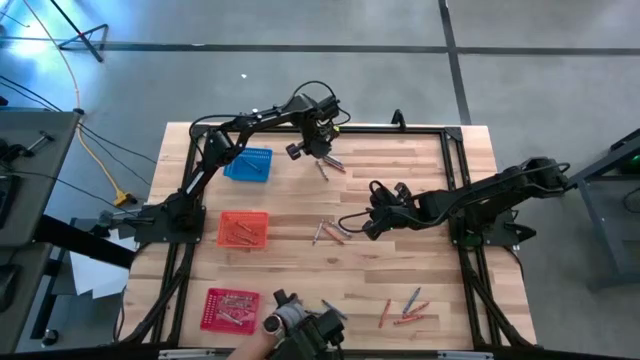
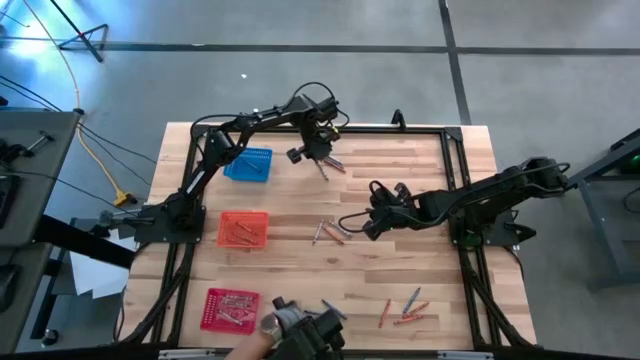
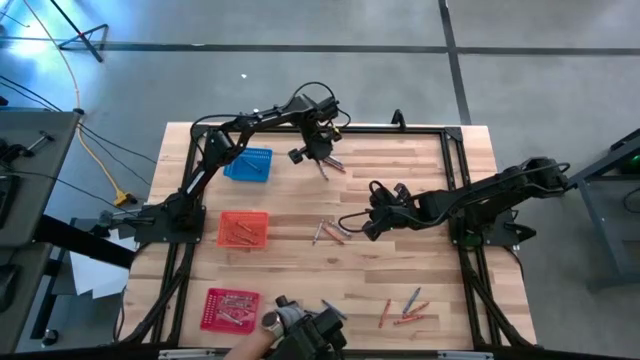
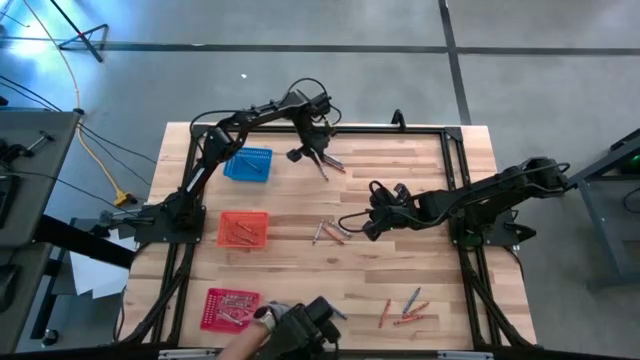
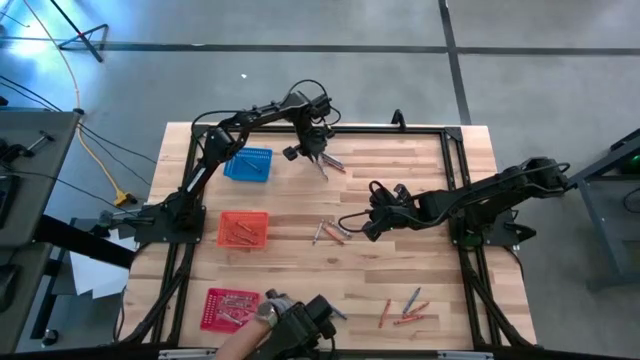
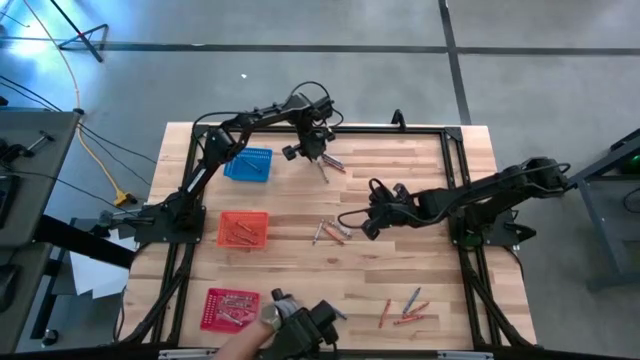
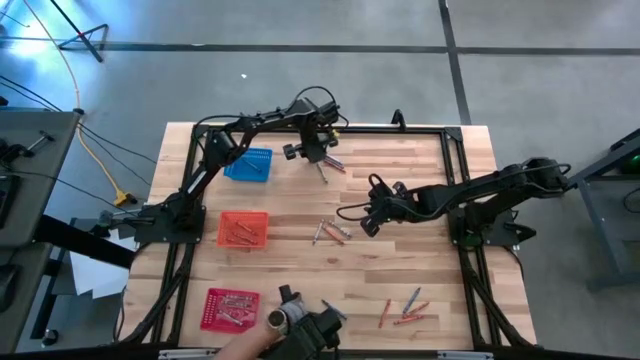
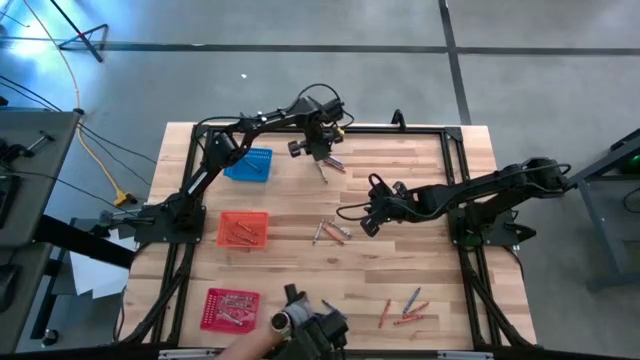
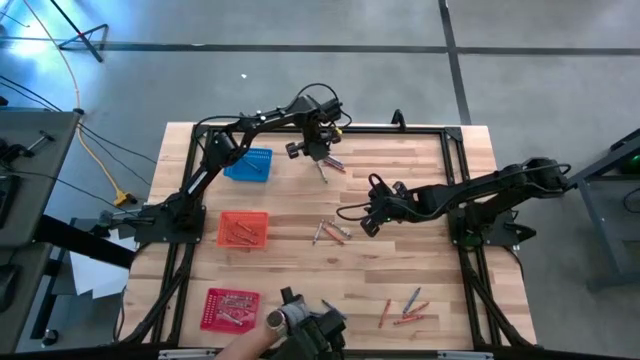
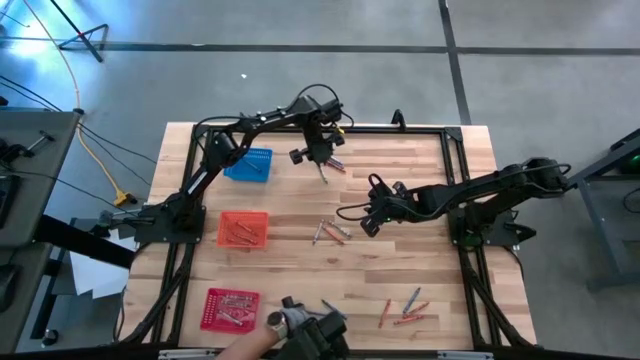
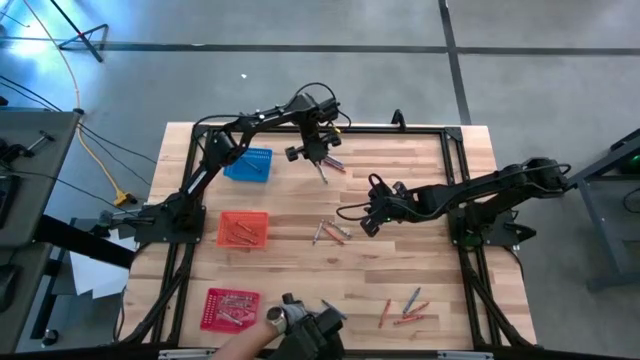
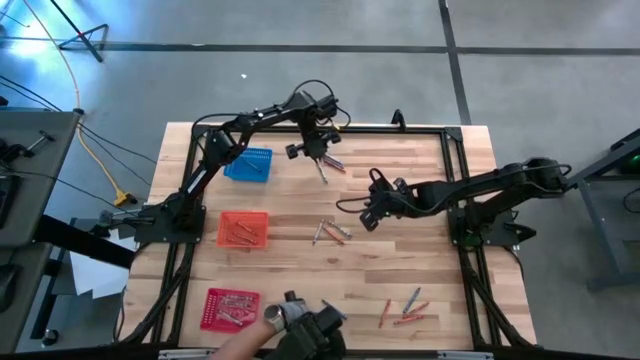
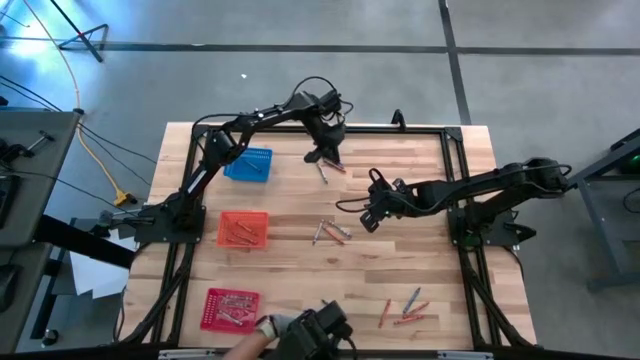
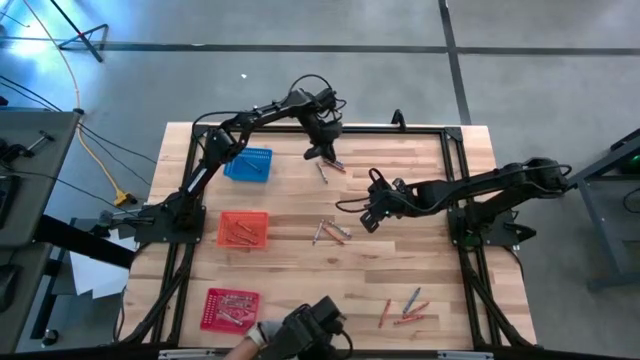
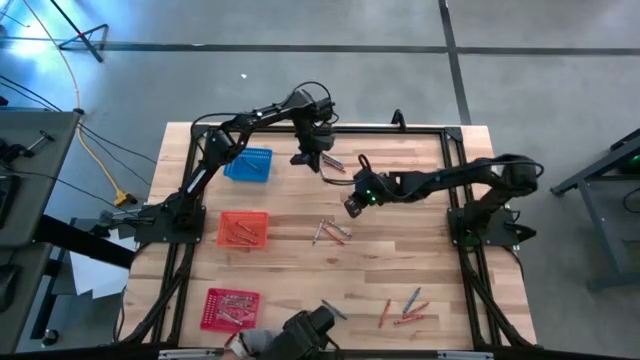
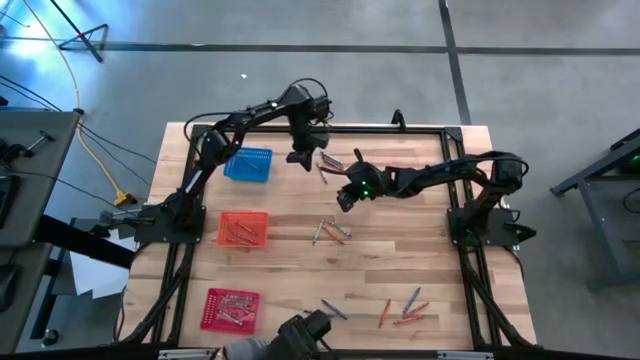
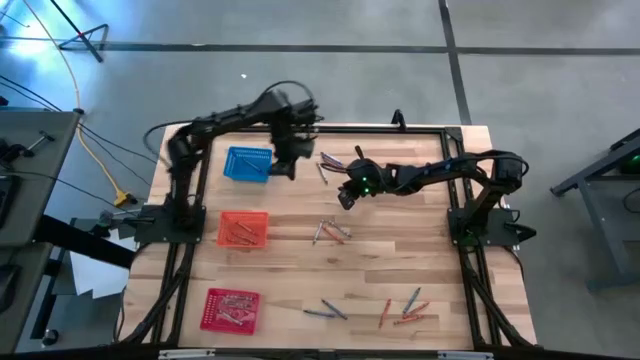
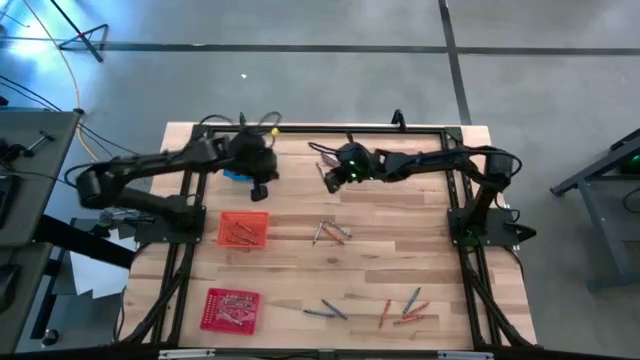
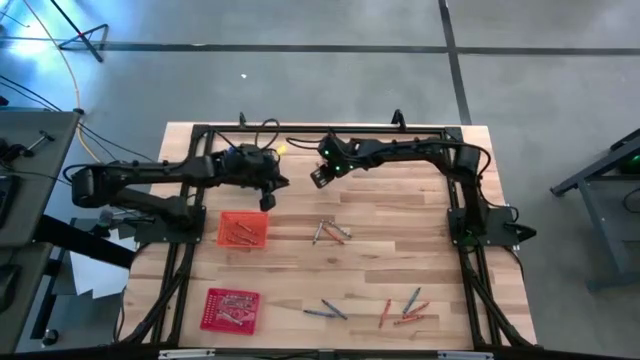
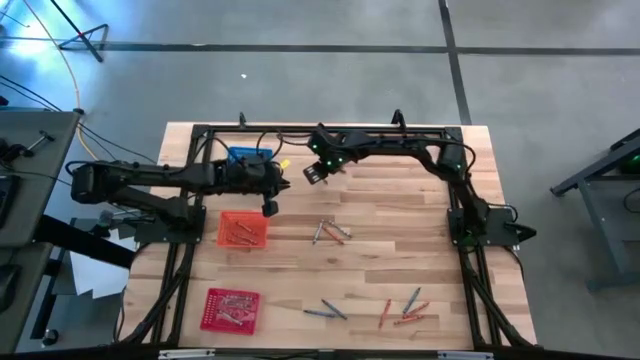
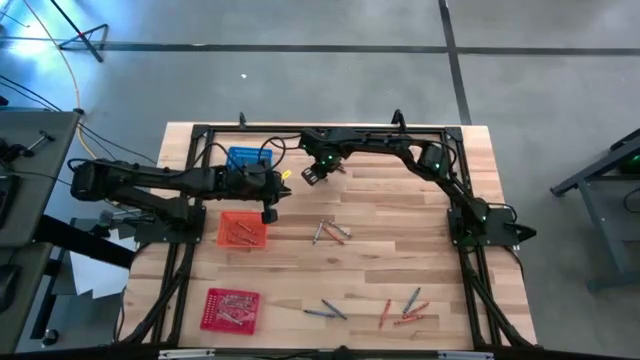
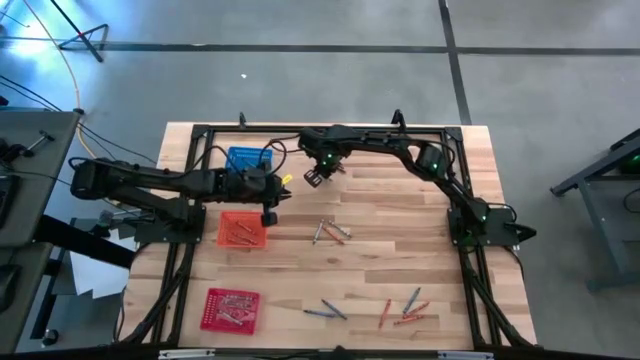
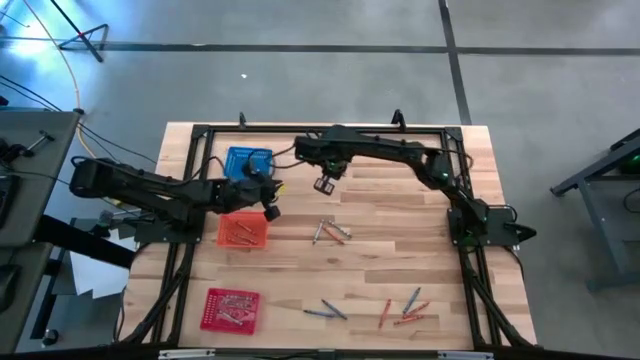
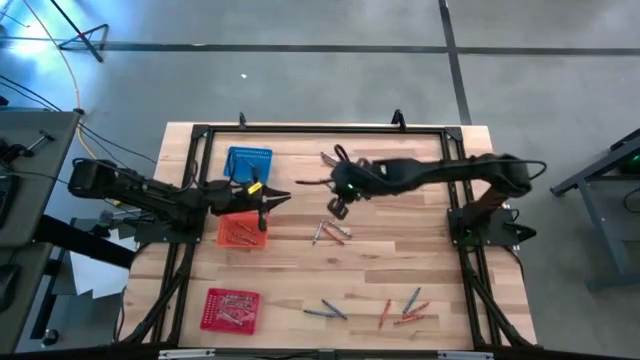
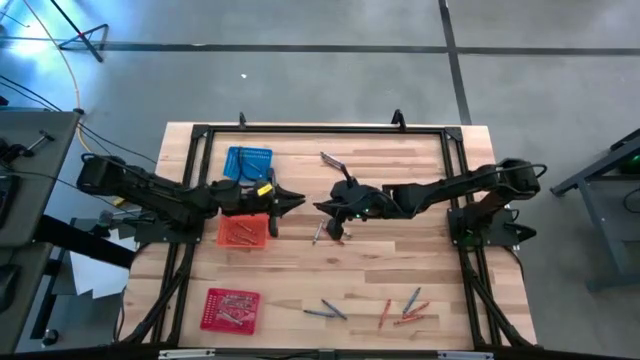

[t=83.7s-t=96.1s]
Task: Sort crayons
Put the gray crayon into the red bin

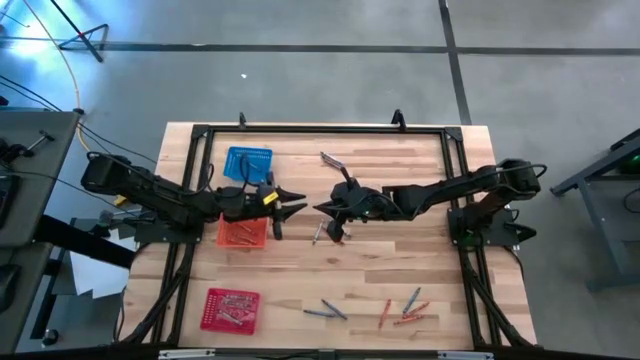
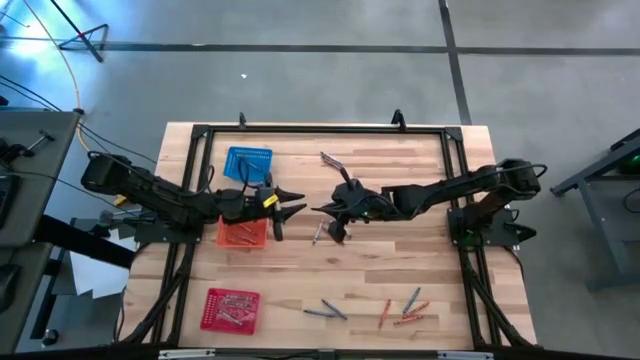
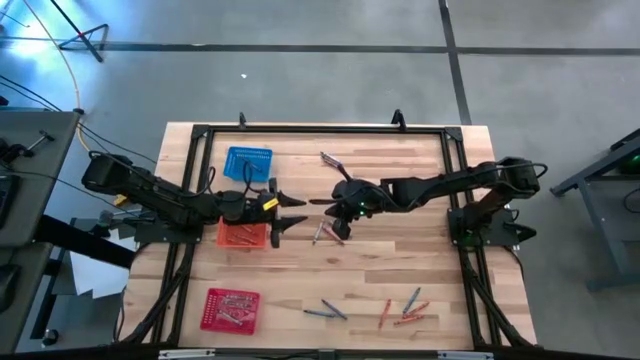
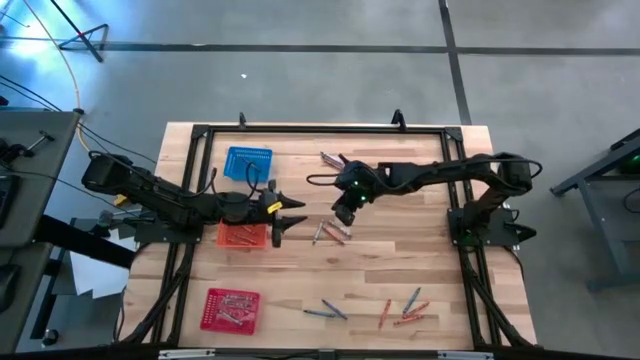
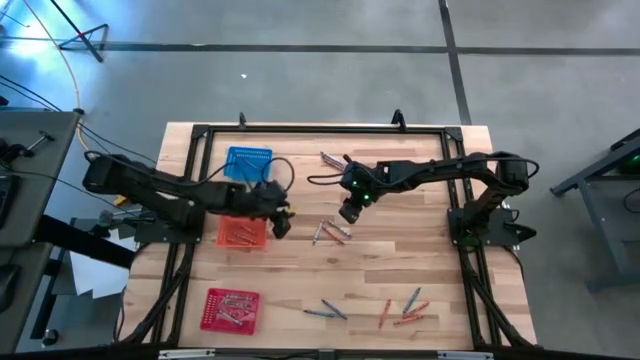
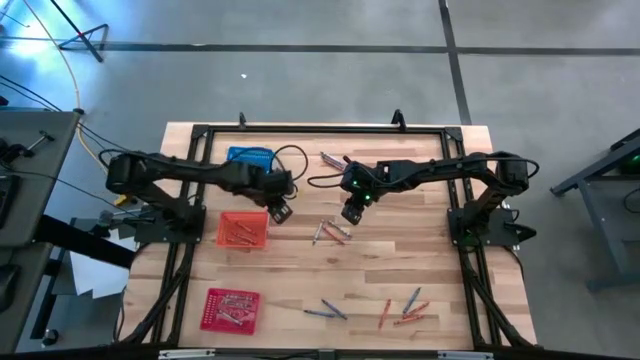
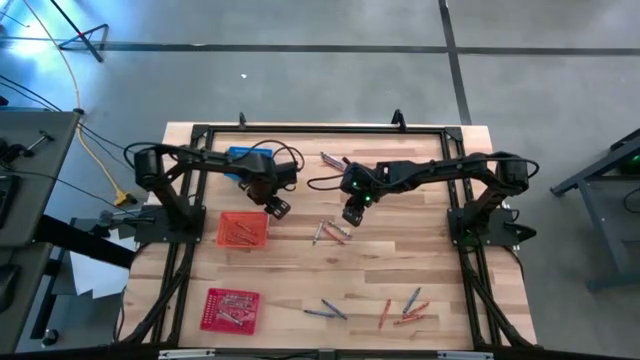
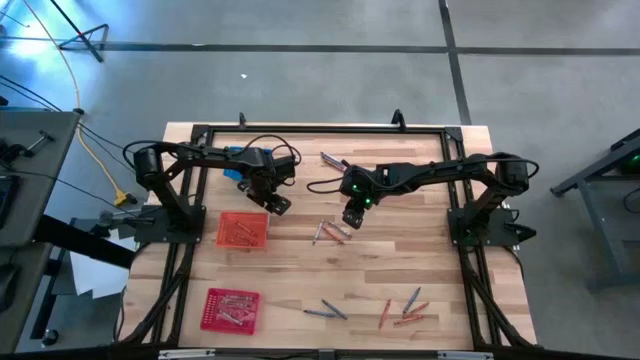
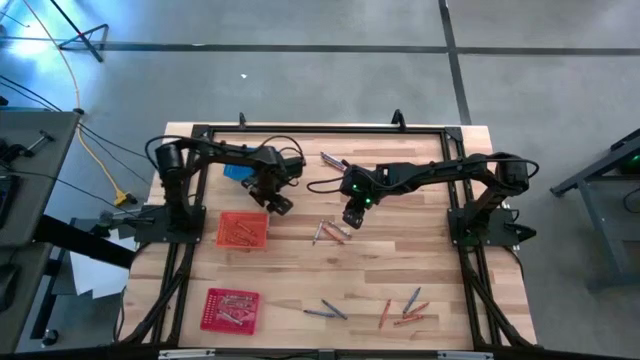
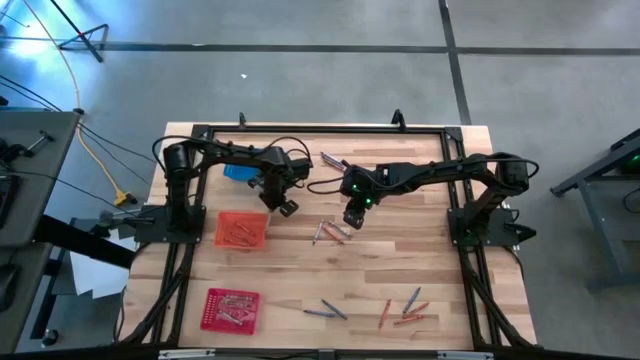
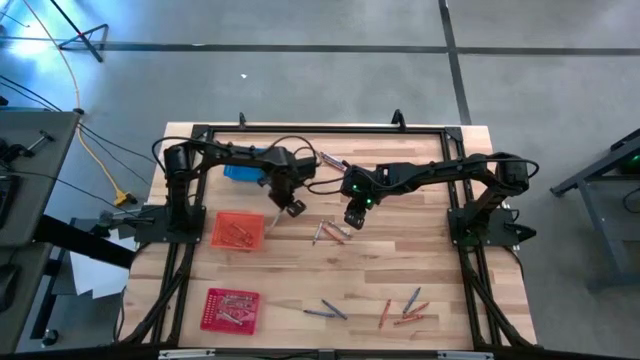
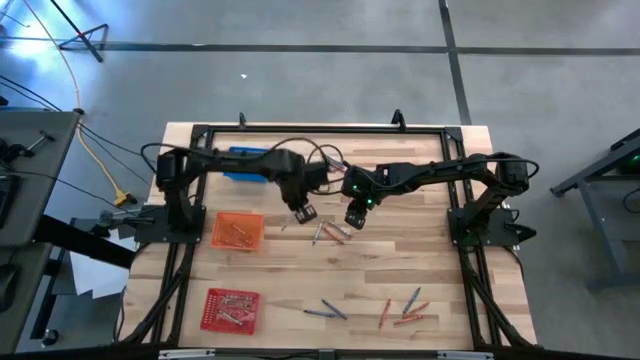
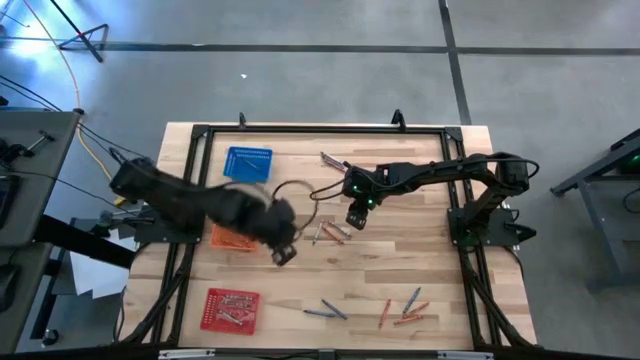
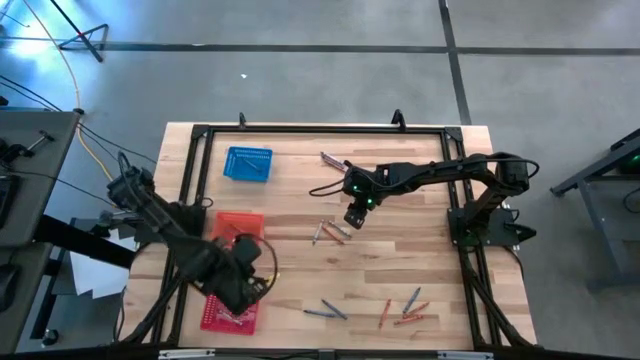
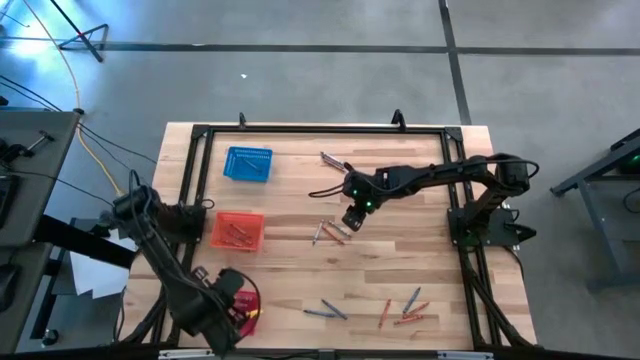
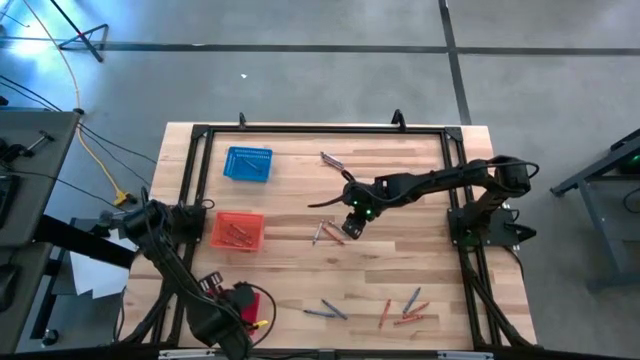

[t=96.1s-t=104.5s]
Put the gray crayon into the red bin

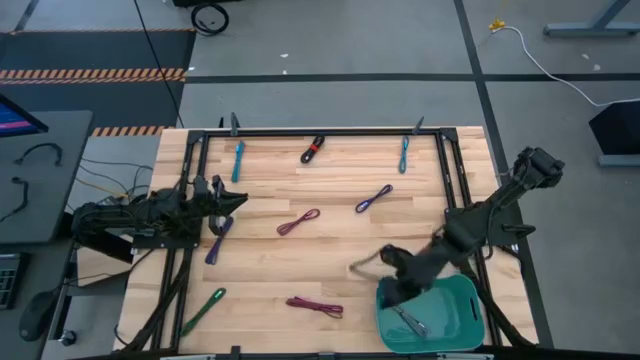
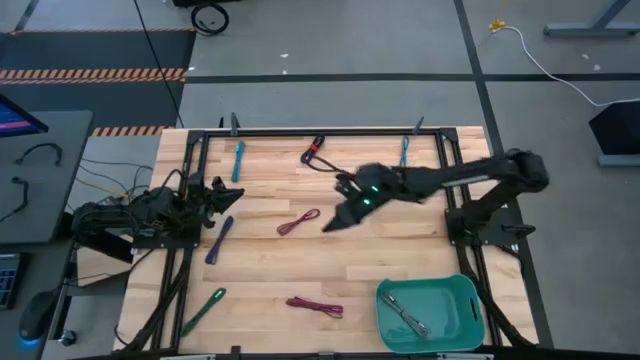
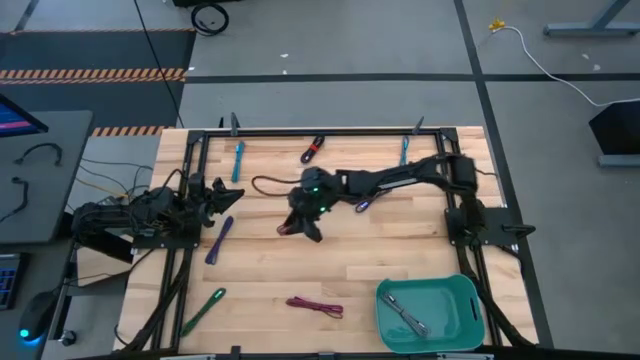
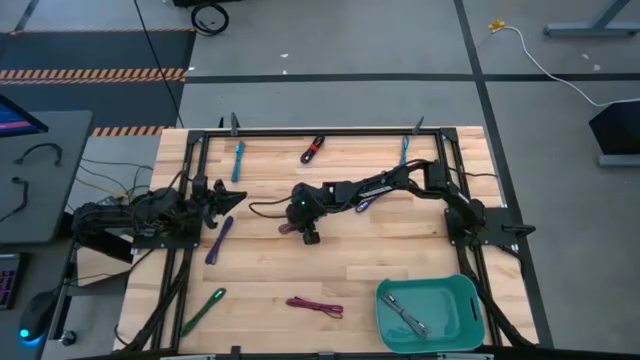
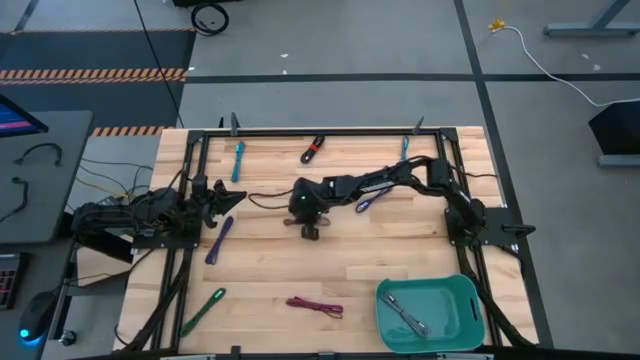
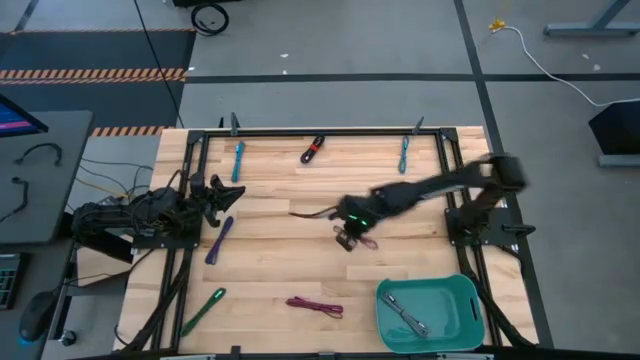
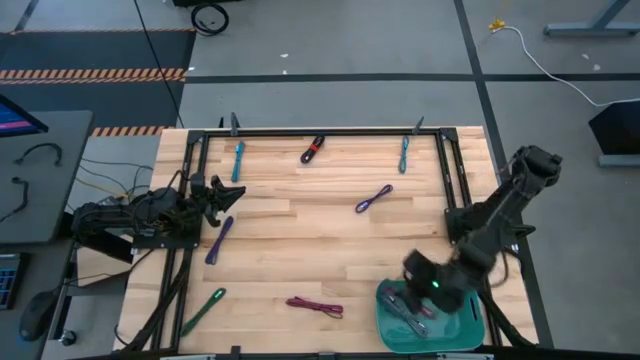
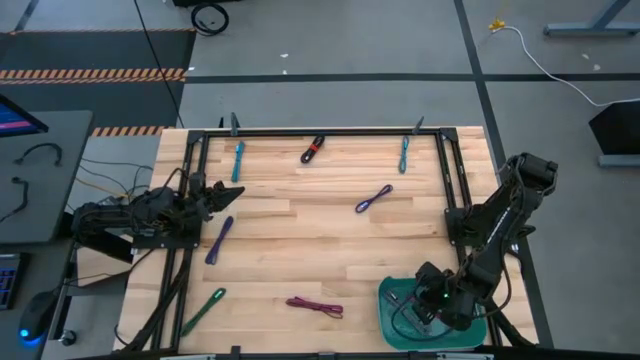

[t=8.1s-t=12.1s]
Task: Pick and place USB-C Cables
Put the pink charger cable into the green bin
